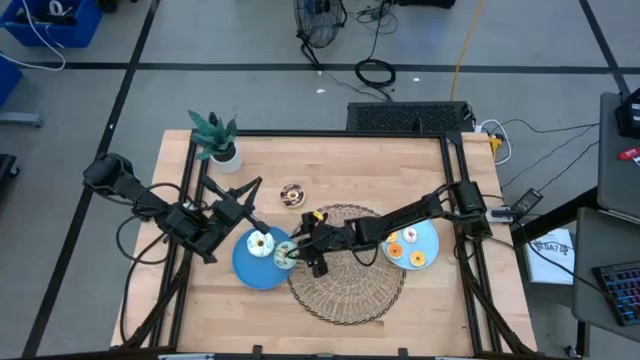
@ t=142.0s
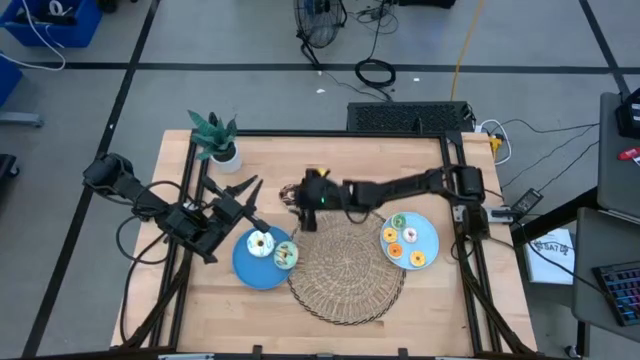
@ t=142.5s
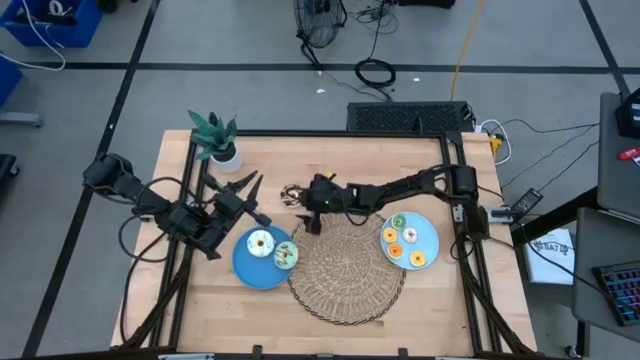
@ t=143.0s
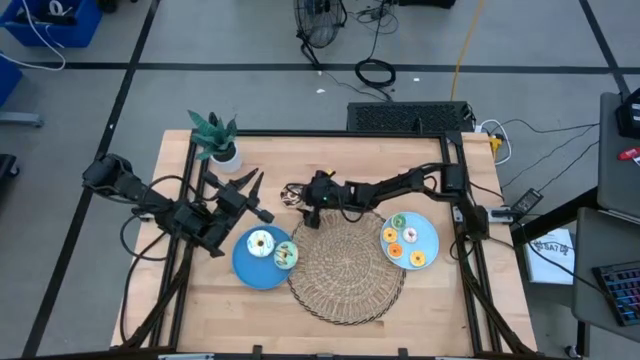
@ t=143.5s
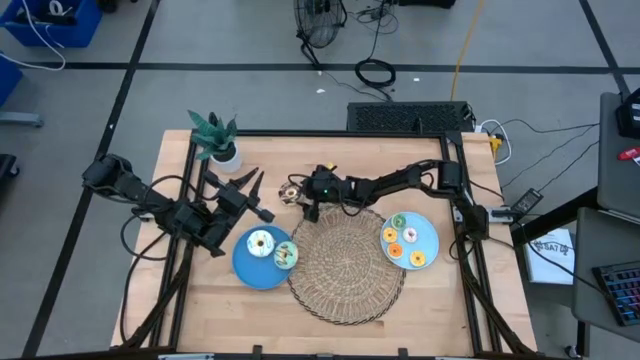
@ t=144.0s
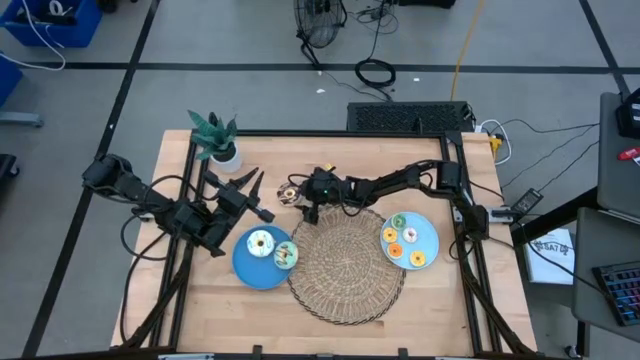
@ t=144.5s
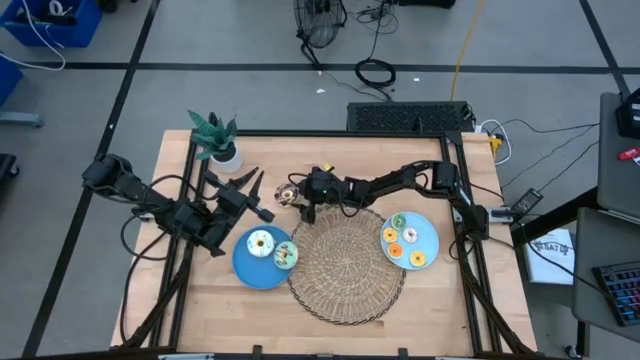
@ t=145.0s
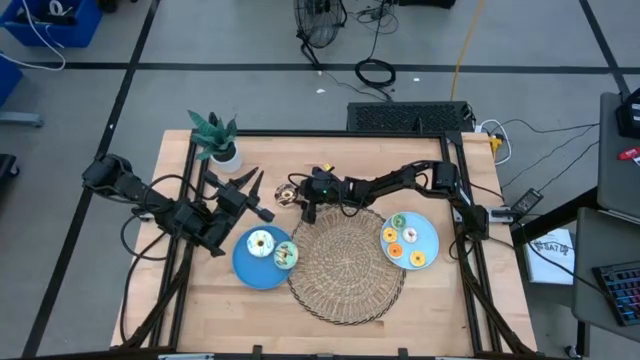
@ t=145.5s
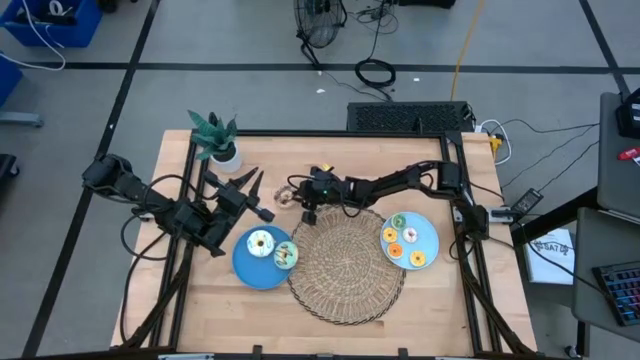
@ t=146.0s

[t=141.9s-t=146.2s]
Task: Pick & Place donuts
Put the large black donut on the blue plate

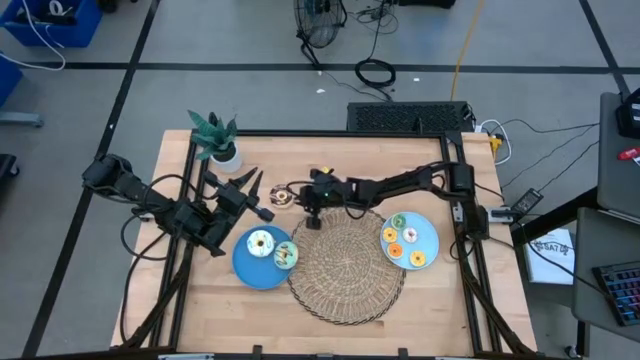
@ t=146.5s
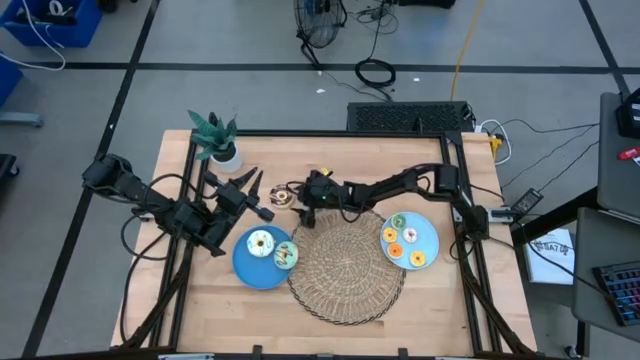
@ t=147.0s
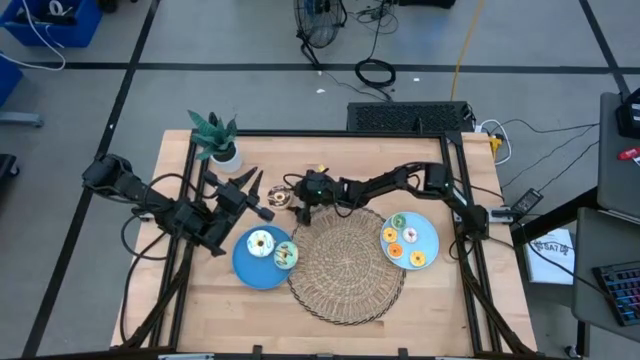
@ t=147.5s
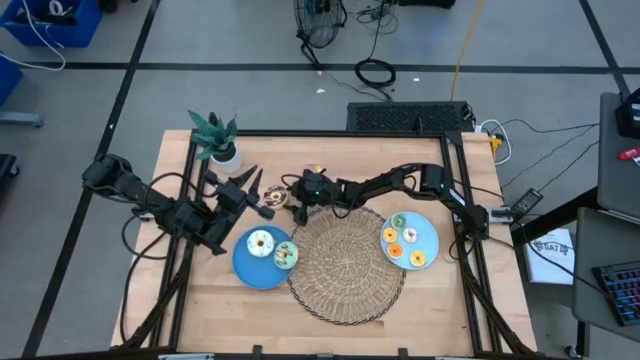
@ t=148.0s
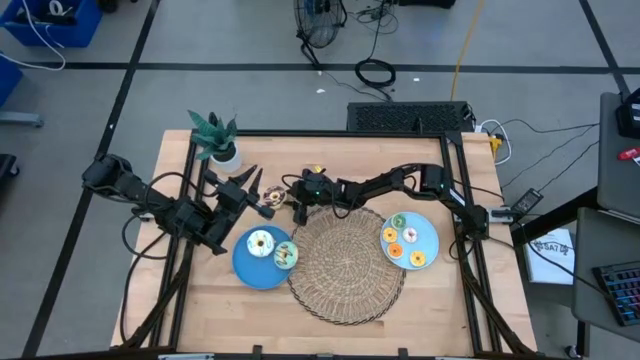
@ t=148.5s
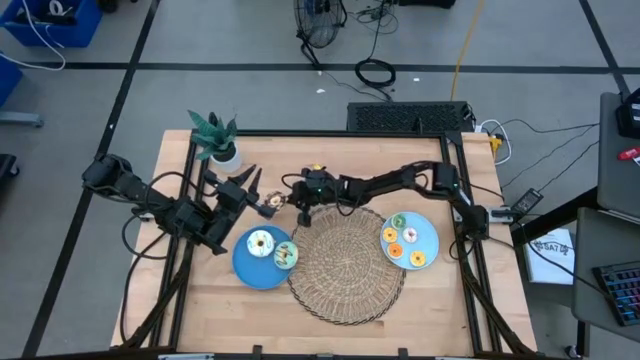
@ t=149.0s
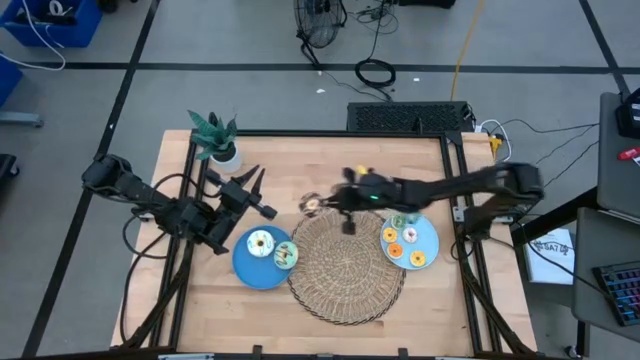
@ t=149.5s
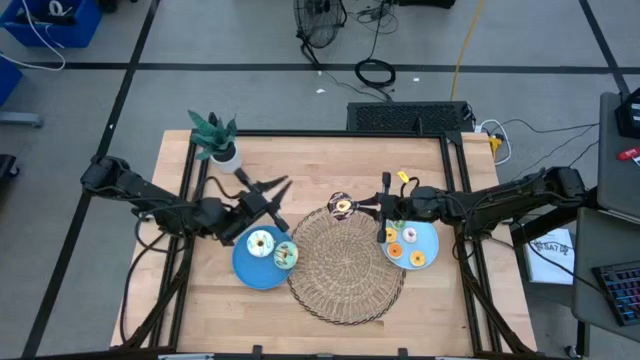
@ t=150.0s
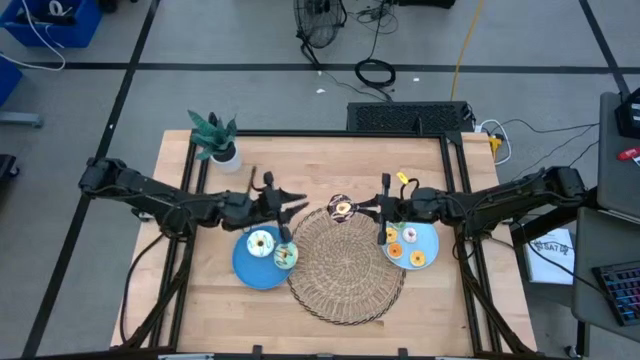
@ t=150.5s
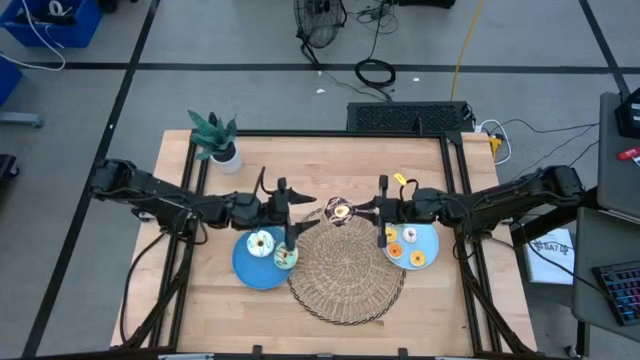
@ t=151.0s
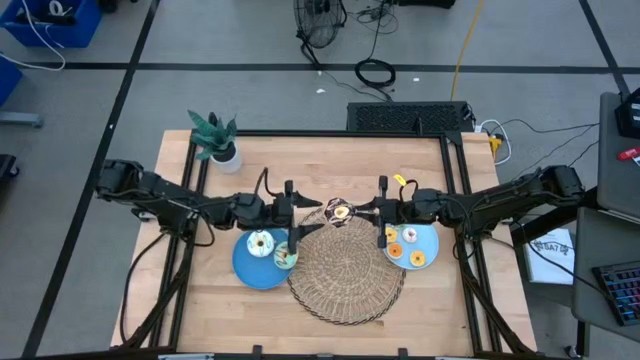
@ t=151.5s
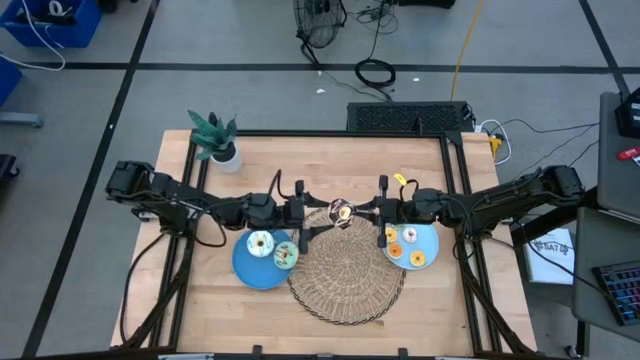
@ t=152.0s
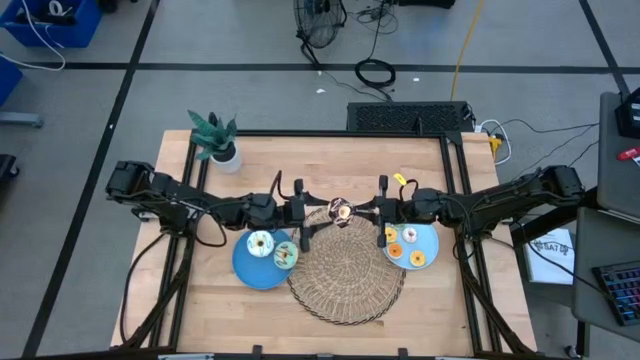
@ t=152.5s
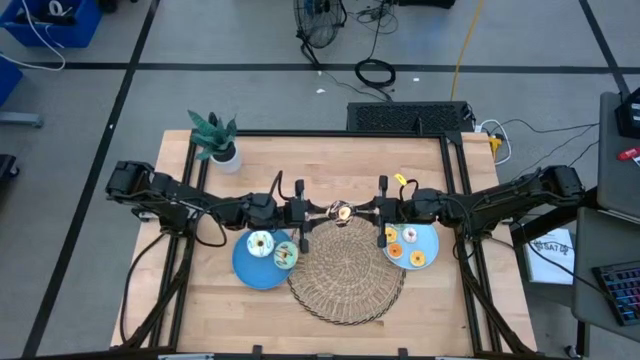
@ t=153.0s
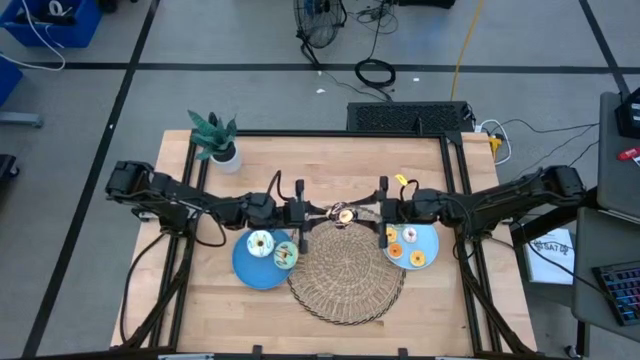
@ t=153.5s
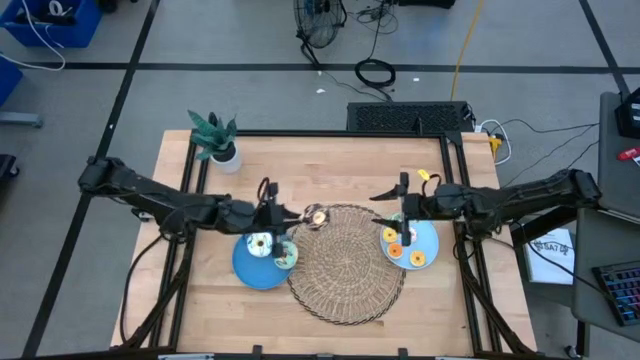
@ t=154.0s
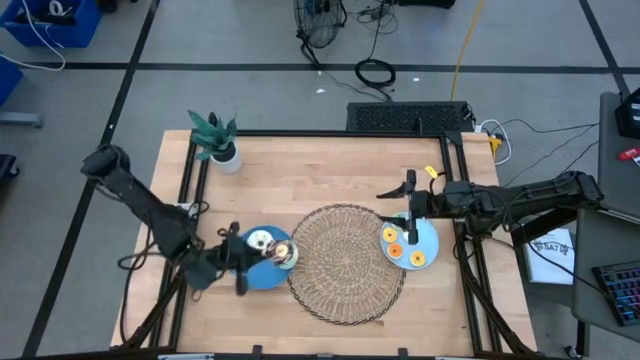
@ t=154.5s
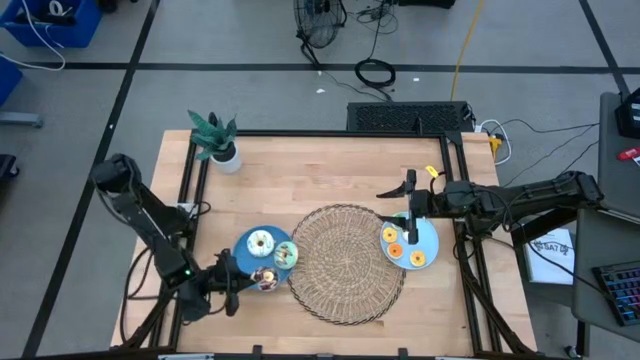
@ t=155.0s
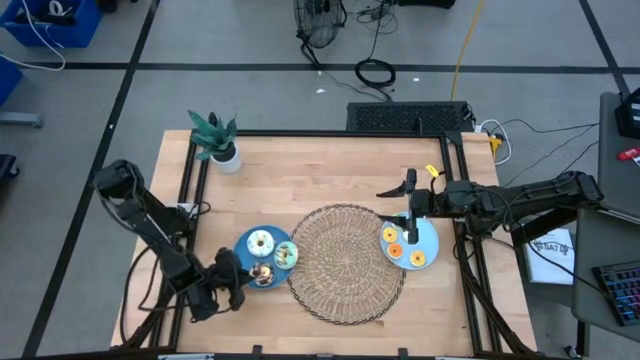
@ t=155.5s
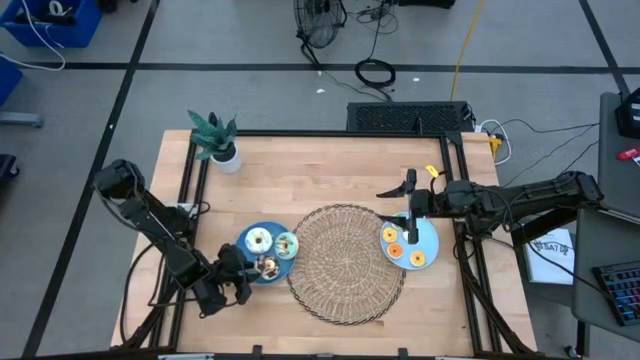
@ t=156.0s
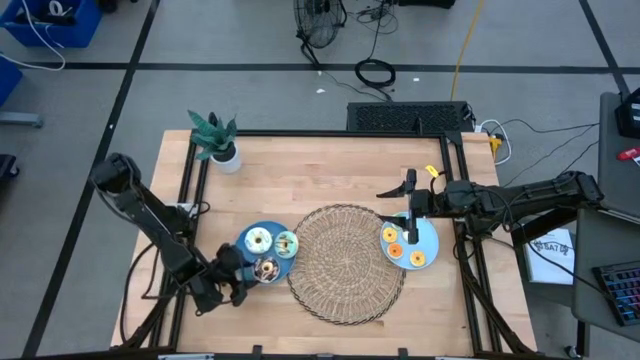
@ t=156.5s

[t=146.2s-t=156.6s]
Put the large black donut on the blue plate

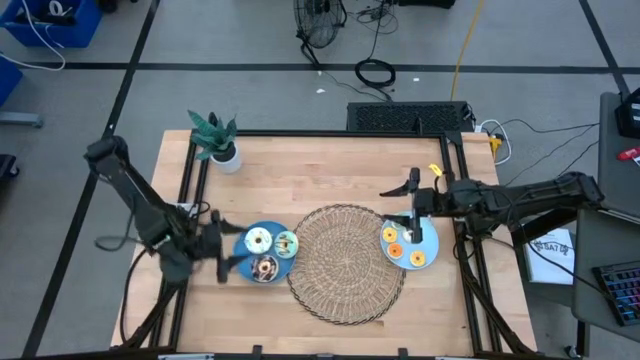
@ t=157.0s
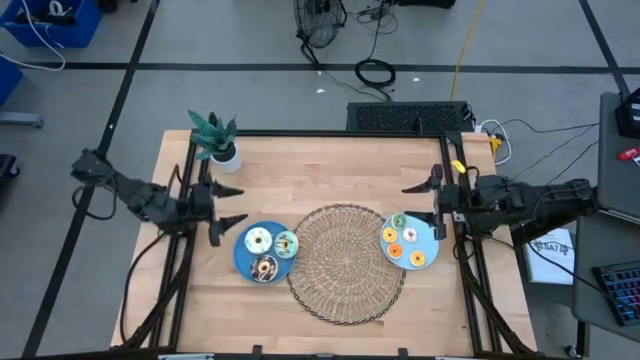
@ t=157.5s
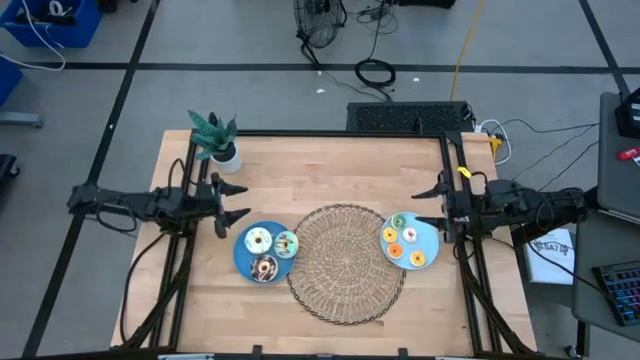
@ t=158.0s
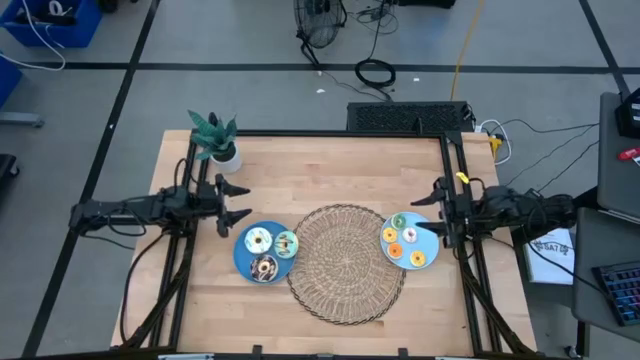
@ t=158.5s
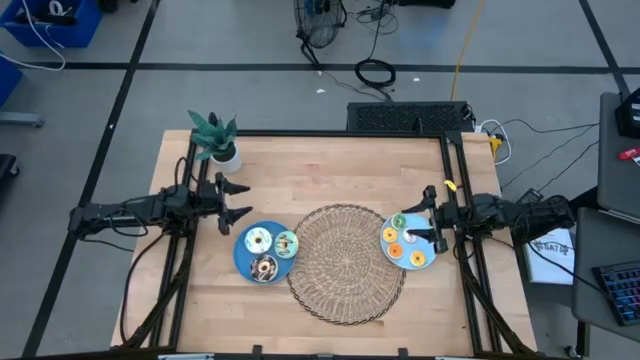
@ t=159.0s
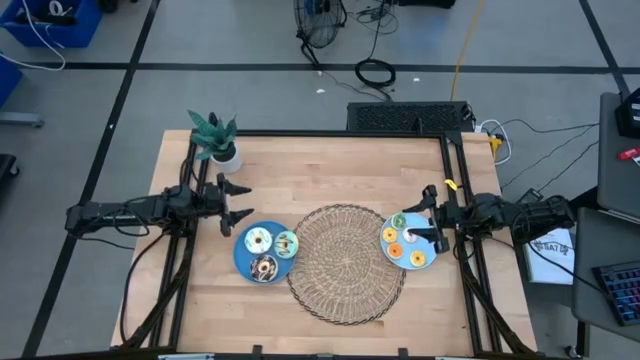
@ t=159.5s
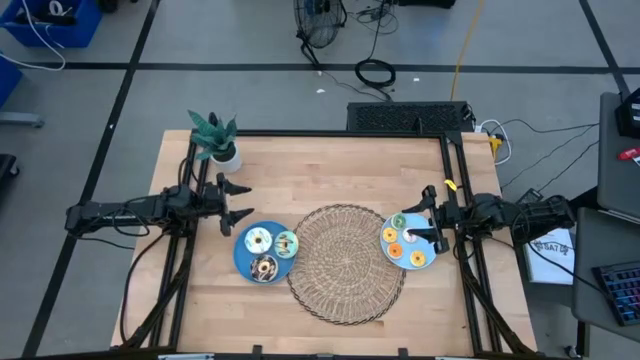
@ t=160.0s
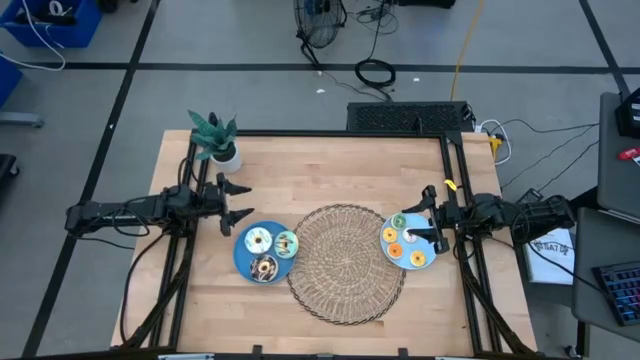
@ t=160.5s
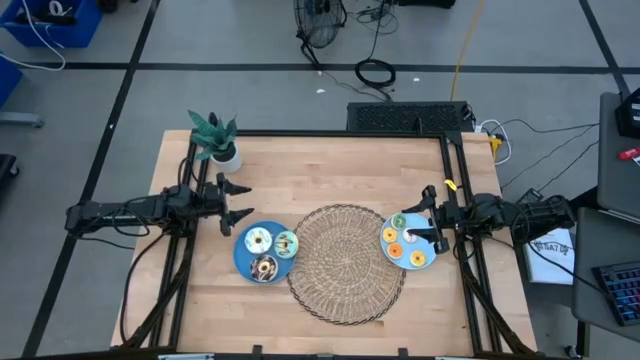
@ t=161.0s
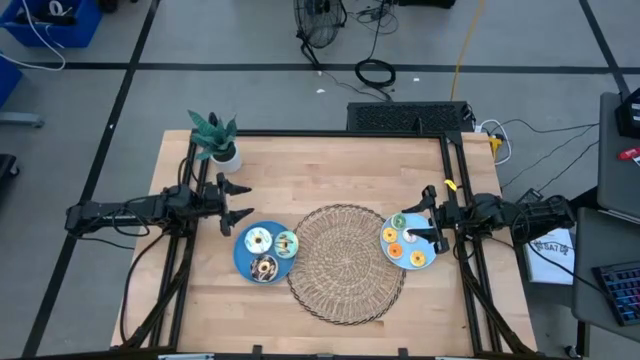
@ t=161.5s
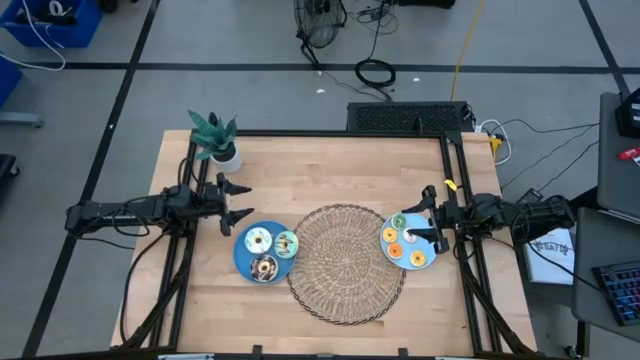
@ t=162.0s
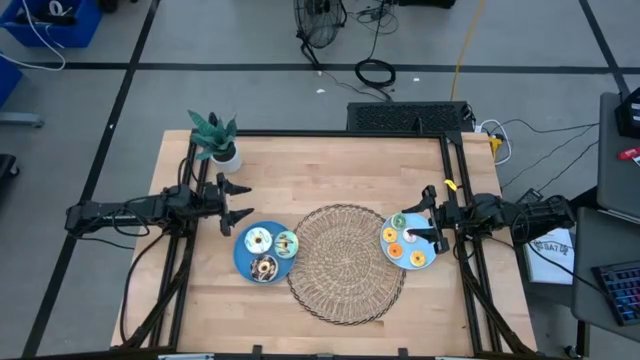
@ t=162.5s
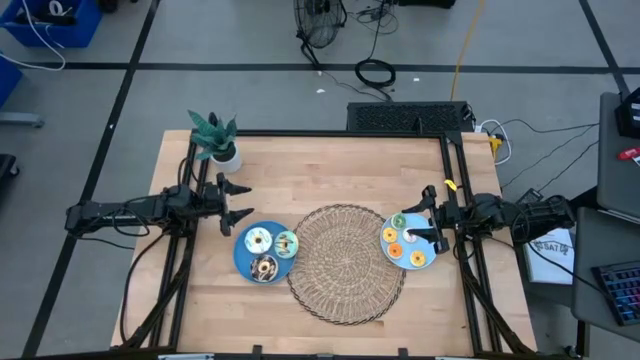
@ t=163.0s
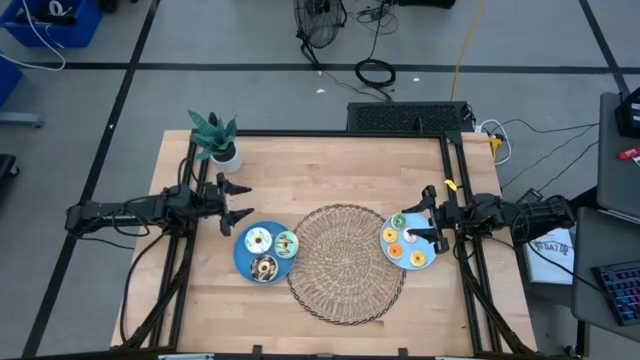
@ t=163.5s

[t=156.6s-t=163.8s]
Return to Home Position
